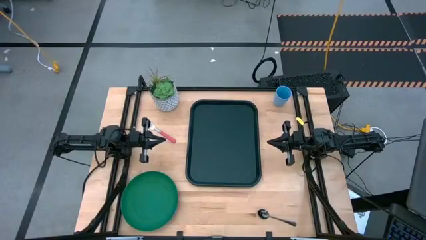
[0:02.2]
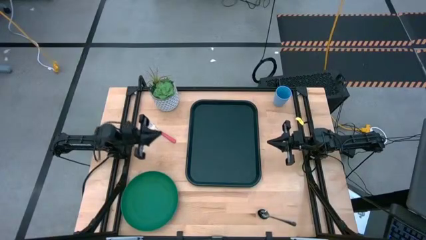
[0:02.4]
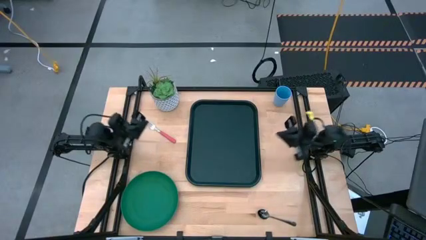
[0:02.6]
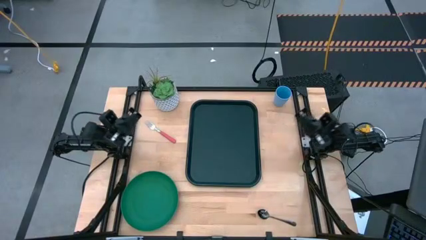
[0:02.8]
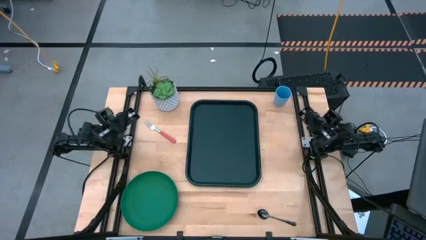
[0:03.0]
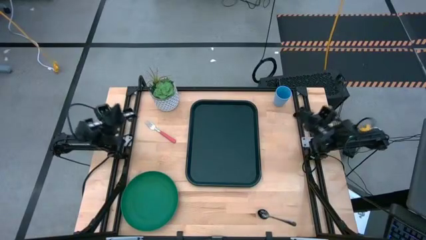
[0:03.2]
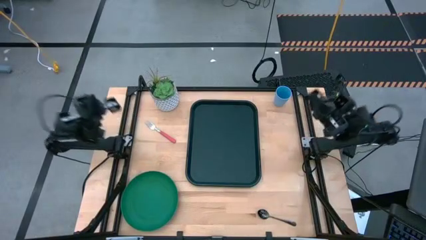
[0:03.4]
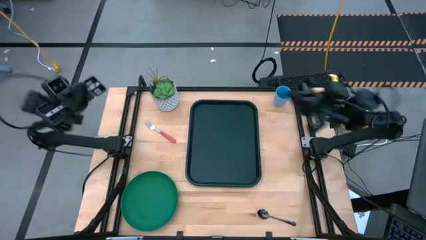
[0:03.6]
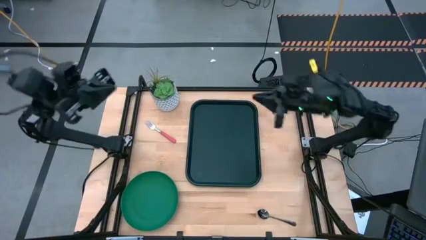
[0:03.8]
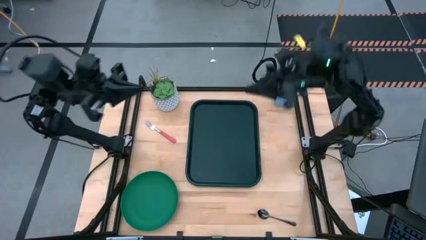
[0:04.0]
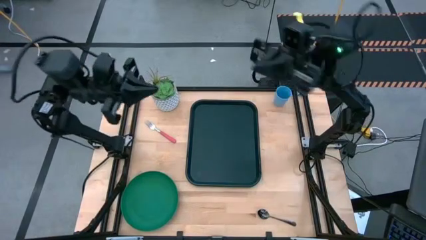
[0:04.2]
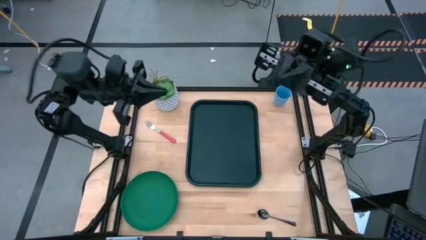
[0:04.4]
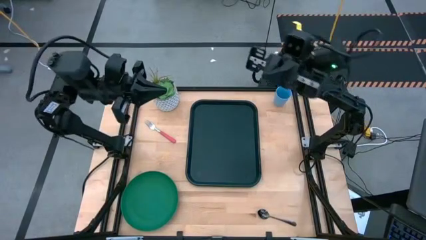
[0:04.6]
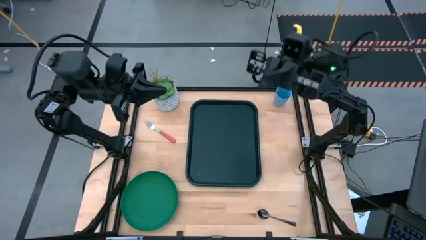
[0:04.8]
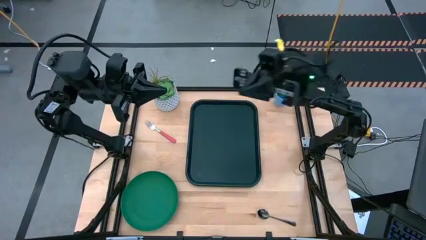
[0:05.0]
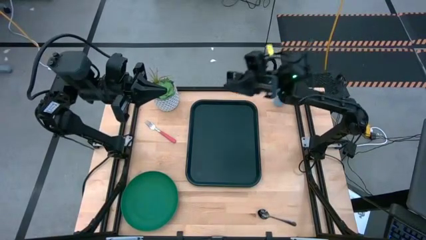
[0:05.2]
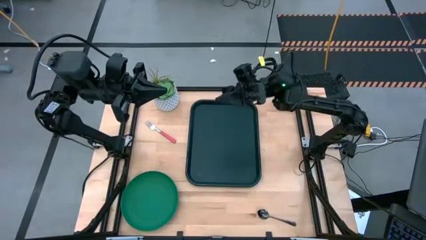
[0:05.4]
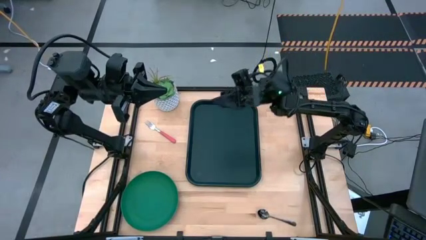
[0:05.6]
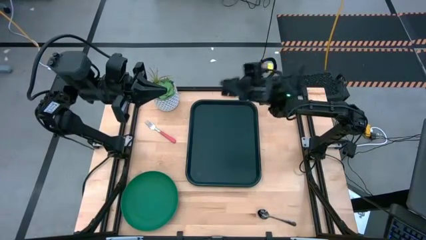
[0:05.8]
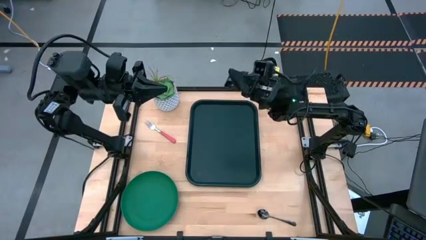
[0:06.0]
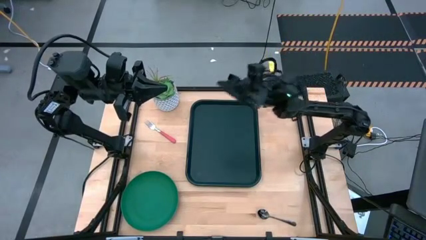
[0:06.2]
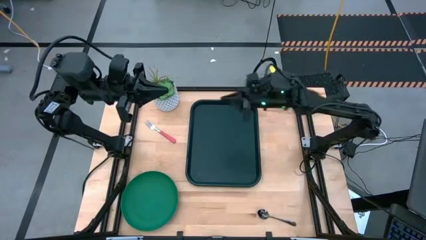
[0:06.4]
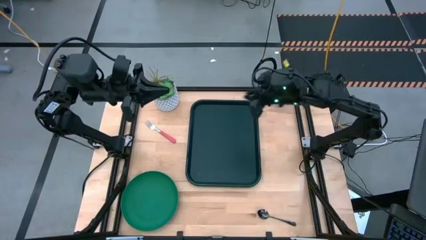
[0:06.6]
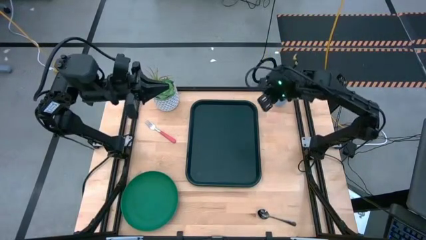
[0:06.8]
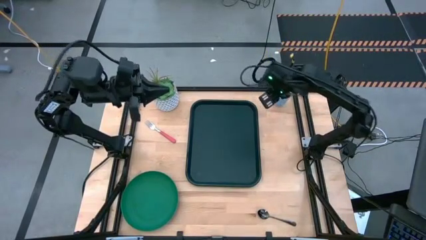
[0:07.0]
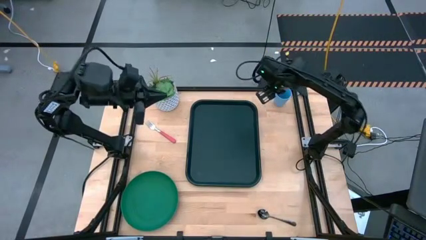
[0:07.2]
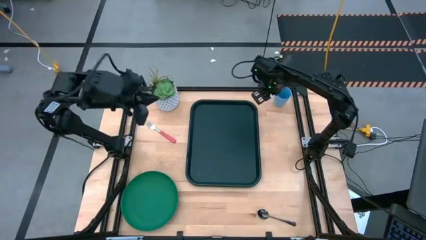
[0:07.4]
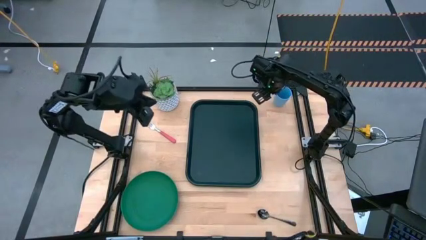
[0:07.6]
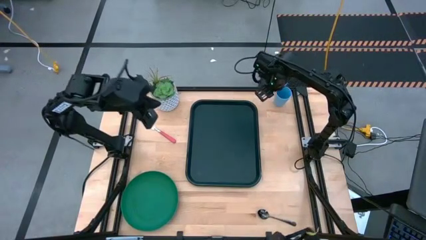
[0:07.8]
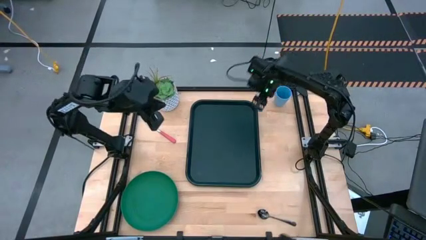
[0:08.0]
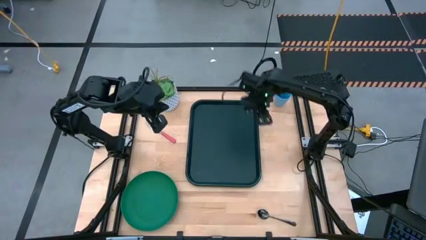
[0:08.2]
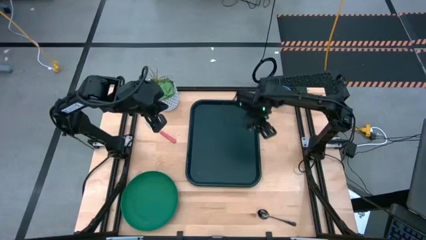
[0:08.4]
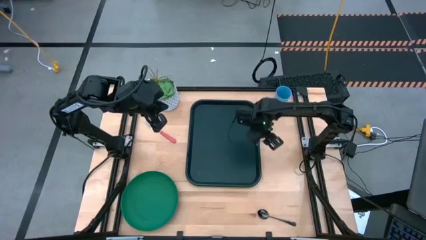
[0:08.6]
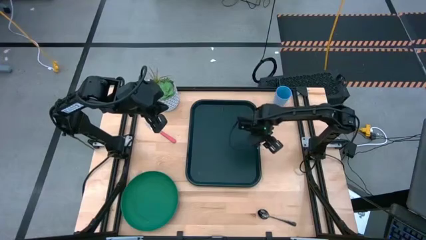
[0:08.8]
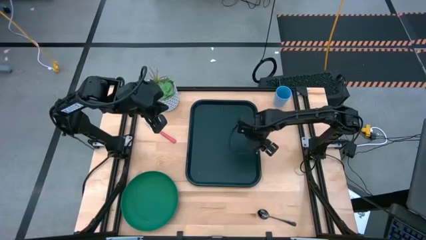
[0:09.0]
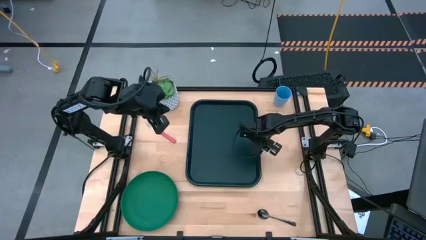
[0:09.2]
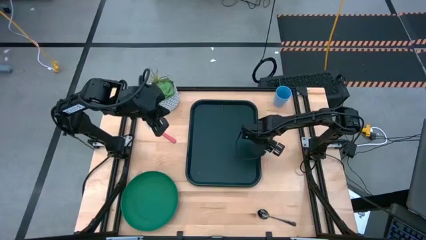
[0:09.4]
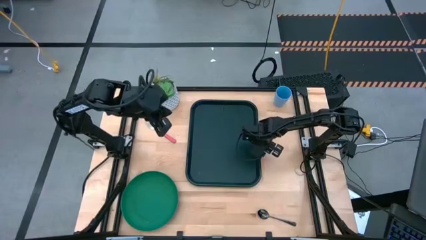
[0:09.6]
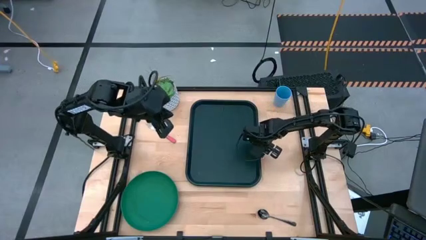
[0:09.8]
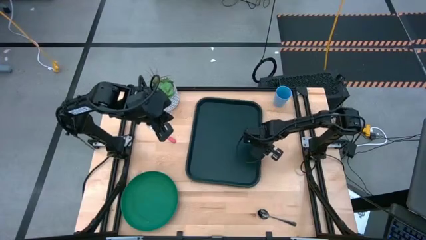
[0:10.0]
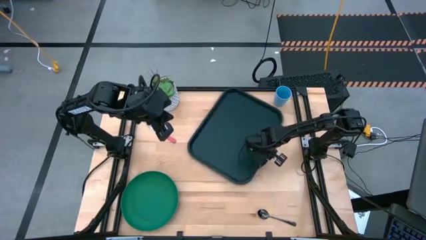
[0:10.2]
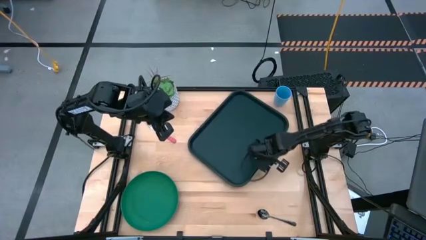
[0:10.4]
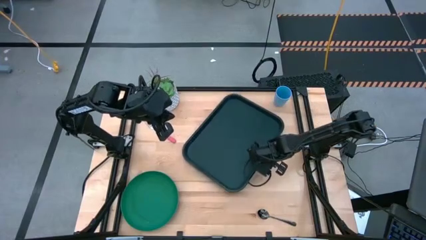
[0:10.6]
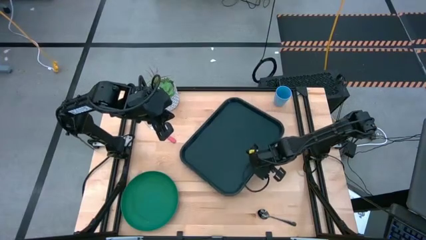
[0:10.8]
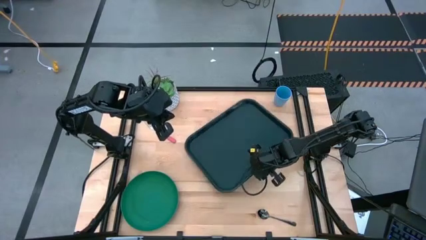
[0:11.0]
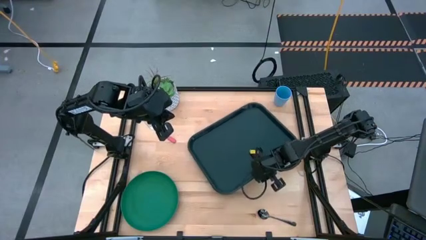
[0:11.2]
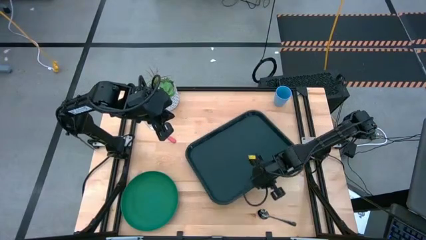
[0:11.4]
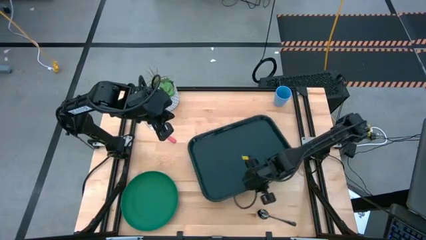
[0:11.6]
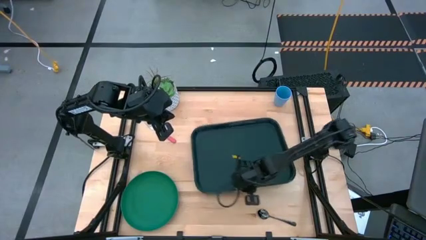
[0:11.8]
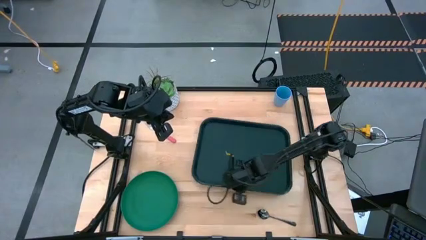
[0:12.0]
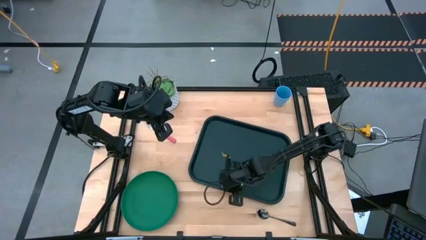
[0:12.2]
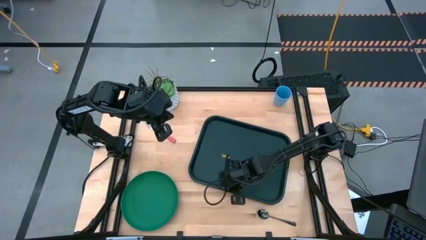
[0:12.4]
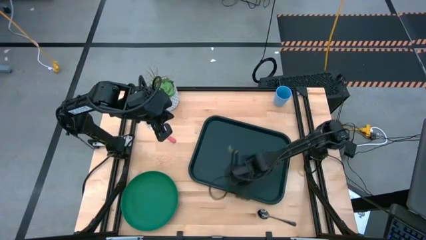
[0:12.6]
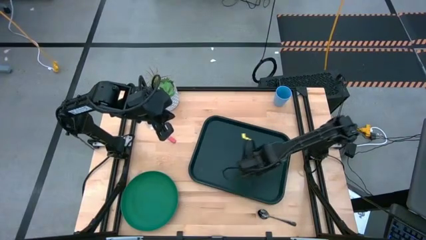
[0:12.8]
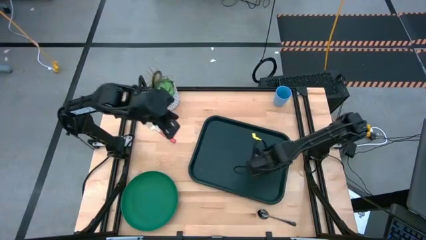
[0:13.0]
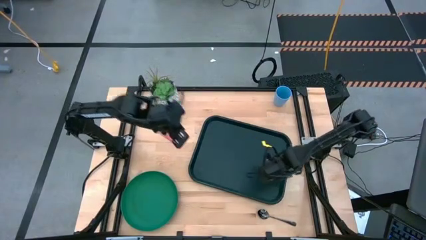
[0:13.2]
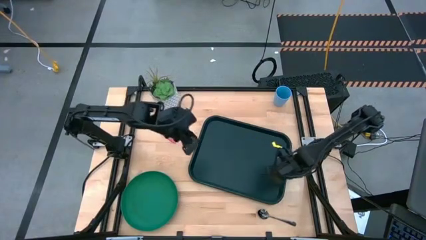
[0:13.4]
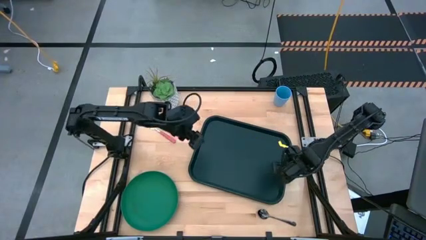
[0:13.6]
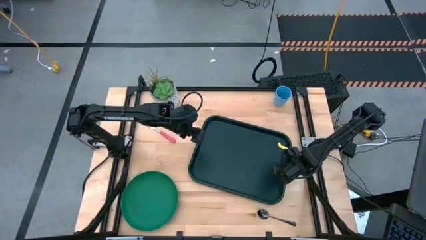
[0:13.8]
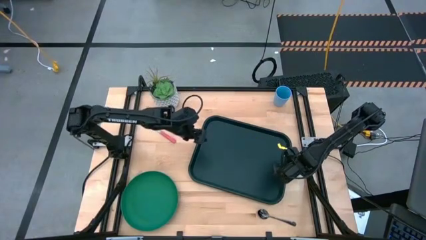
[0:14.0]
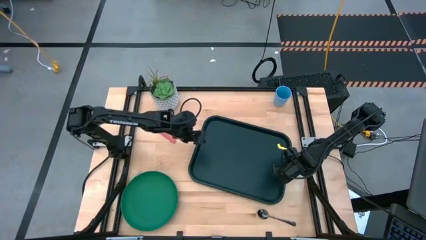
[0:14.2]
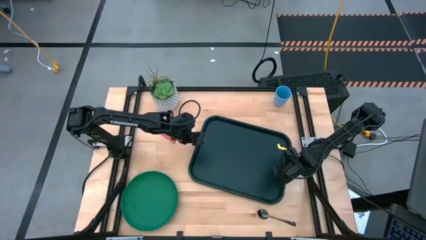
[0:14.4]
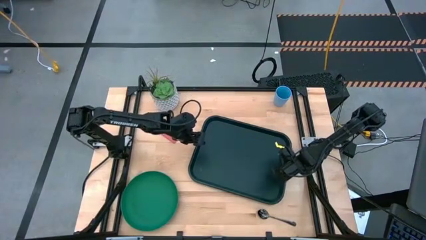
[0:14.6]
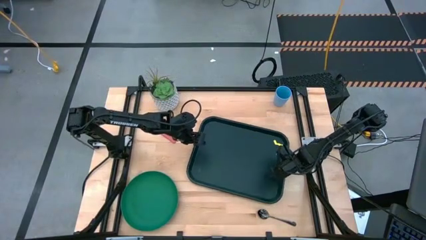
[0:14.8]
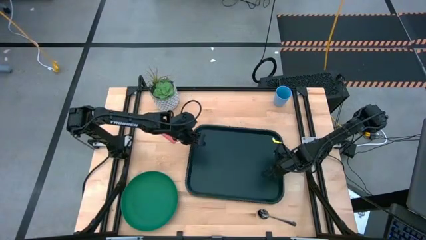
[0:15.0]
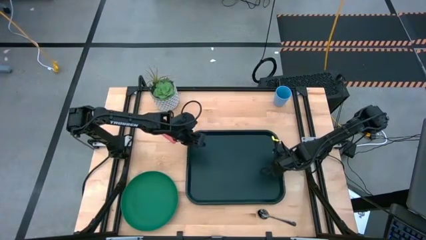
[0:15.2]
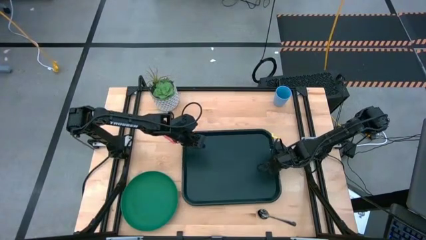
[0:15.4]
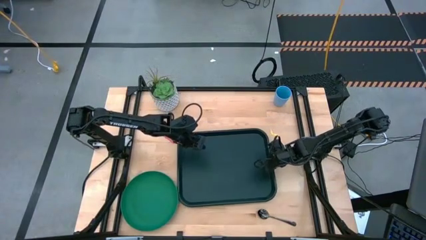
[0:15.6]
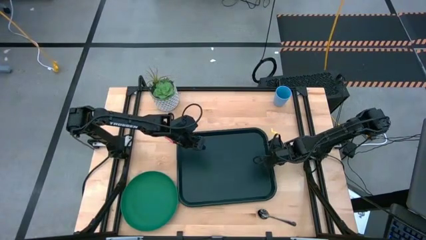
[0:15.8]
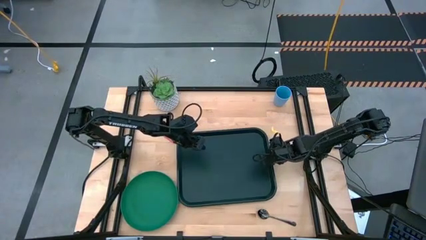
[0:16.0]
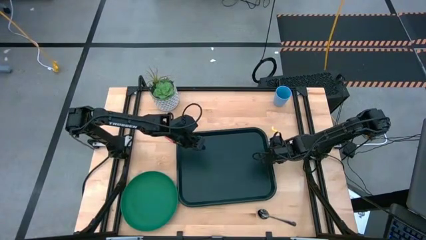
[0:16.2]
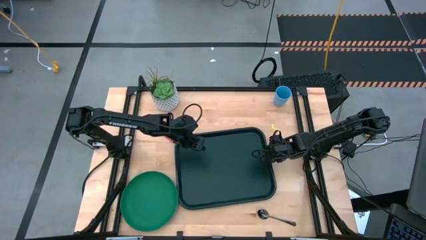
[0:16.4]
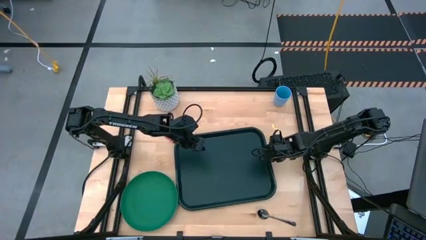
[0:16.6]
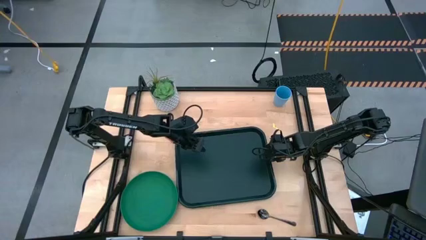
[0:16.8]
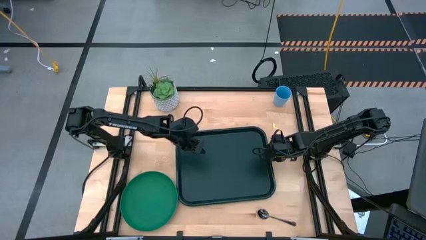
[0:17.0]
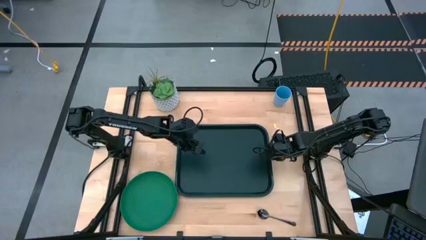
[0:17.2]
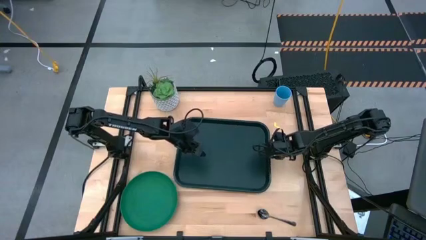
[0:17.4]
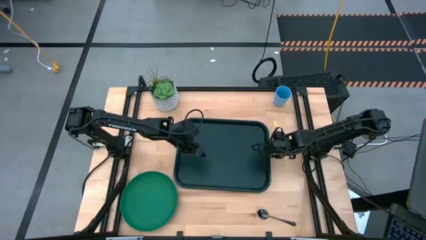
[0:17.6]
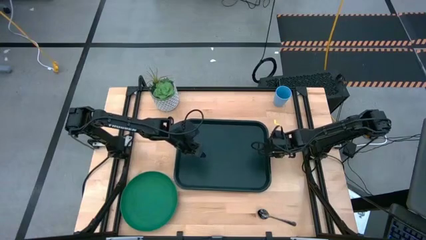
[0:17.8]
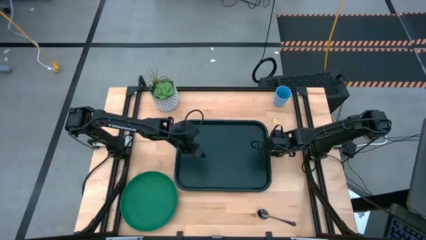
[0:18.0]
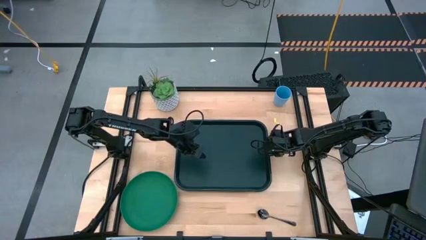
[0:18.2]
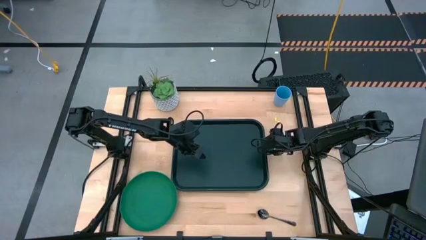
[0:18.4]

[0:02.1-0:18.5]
Task: Pick and place plate/cup/fork/spoon on tray
Prepare the dark green serving tray
